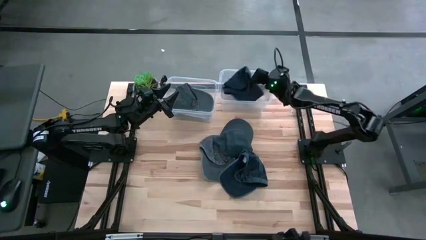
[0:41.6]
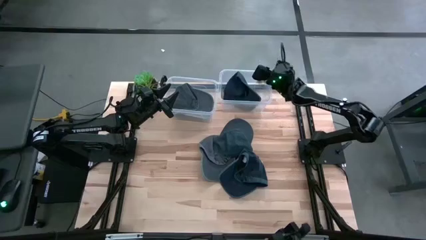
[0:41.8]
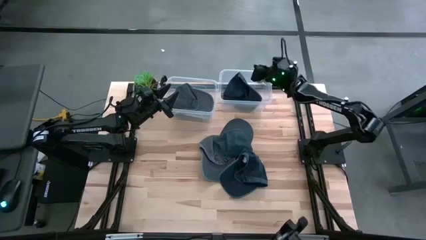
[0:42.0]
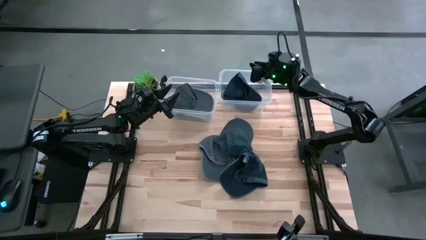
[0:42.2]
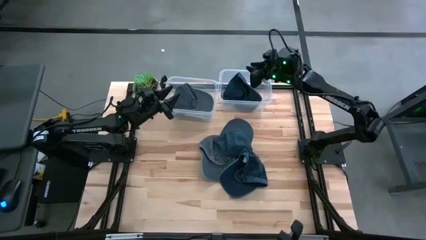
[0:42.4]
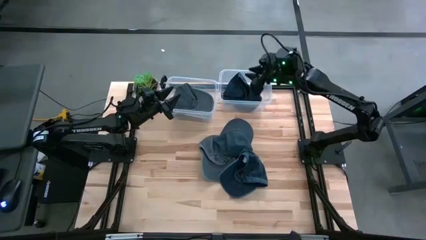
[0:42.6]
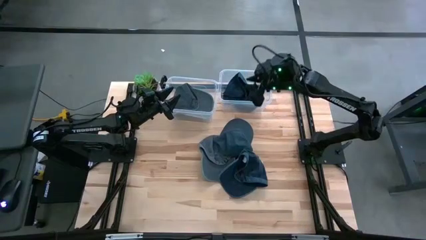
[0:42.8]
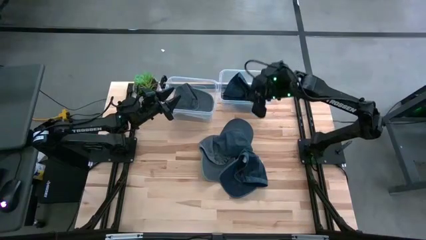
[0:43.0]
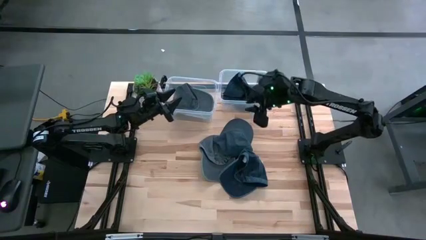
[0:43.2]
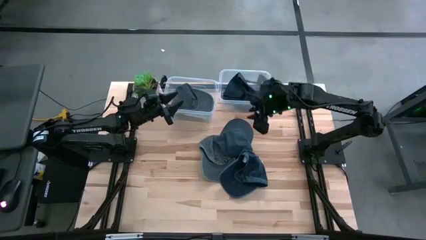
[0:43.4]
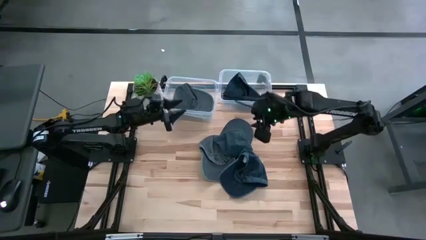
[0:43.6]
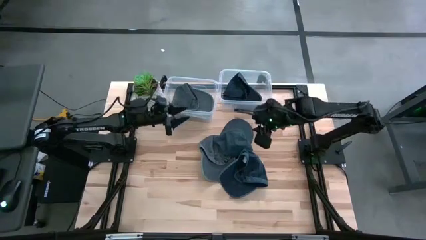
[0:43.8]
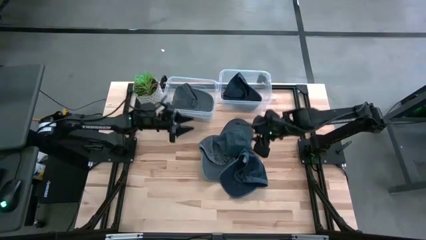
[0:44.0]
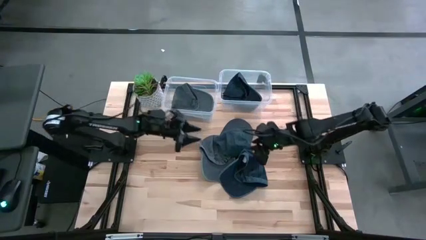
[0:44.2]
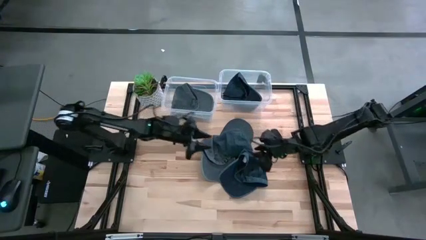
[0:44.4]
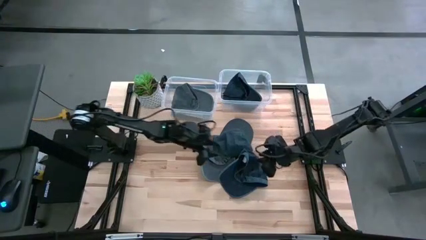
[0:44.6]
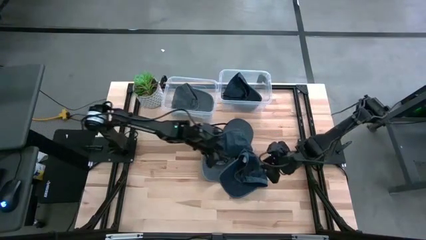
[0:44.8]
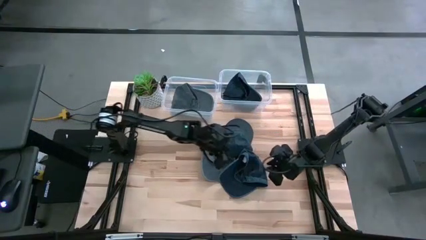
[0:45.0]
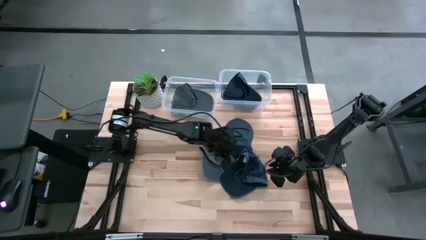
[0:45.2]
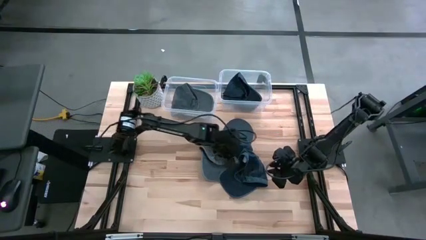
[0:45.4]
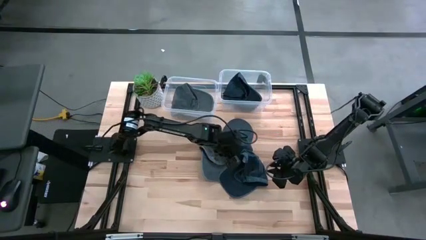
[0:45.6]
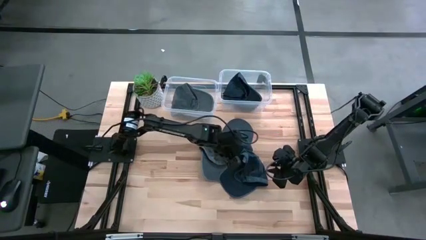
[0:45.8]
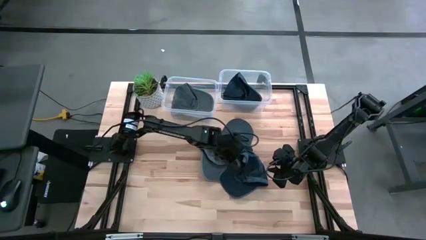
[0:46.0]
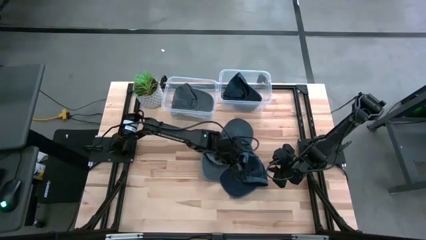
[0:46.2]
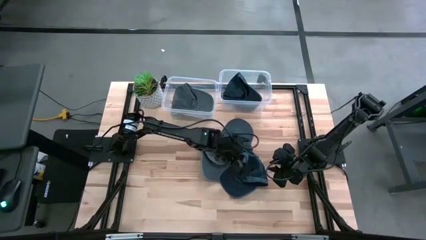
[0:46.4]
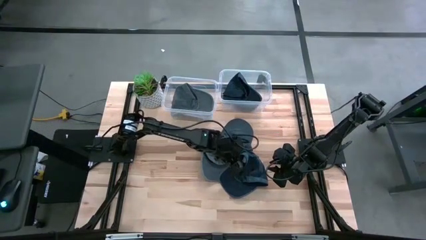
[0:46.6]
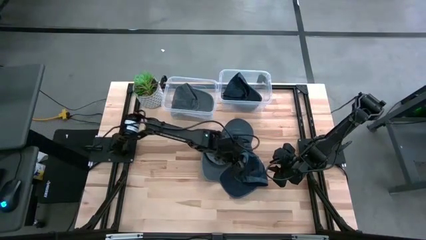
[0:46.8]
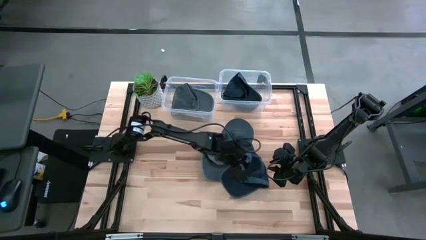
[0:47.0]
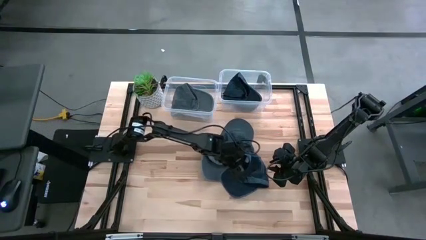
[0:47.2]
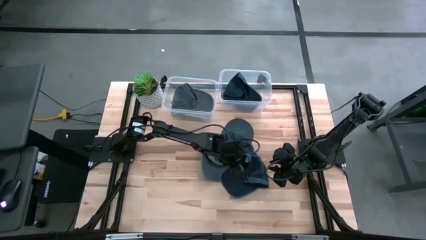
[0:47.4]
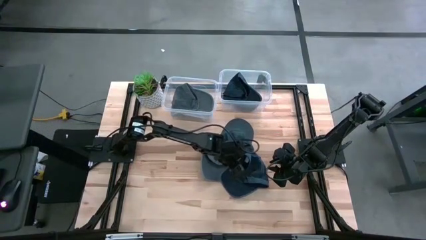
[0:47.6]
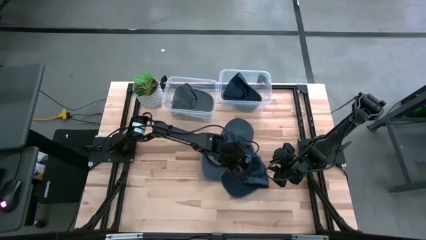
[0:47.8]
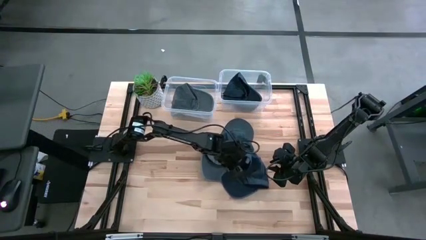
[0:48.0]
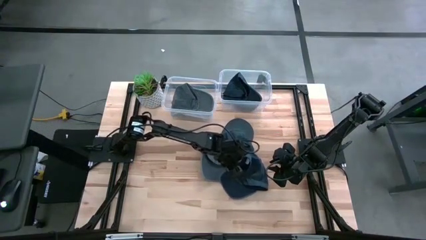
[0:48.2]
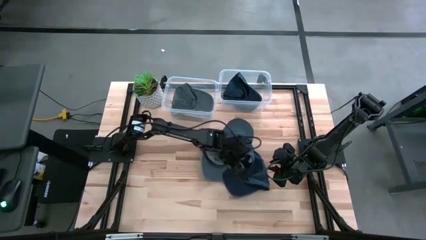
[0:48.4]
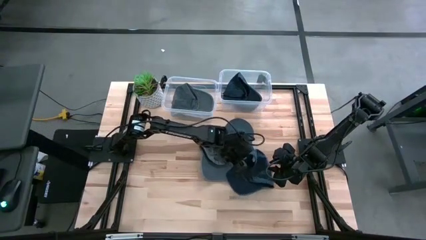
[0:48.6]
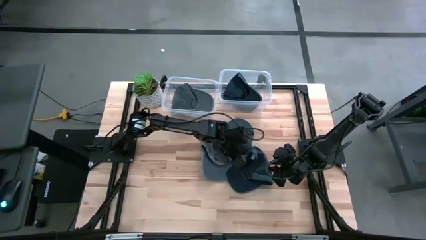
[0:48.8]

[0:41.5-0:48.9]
Task: Pick & Place hat
Put the bottom blue cap into the right transparent bin

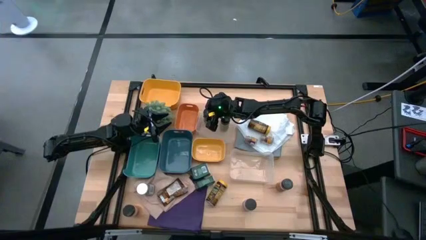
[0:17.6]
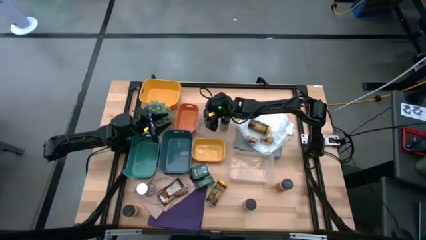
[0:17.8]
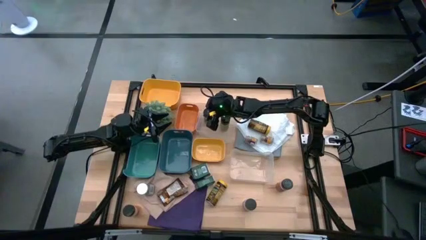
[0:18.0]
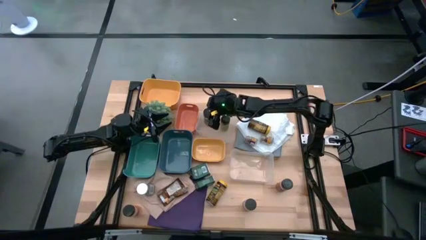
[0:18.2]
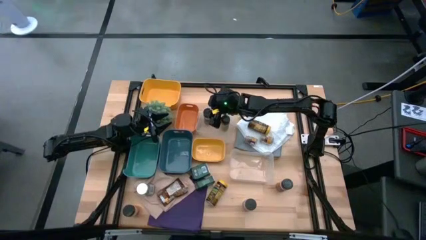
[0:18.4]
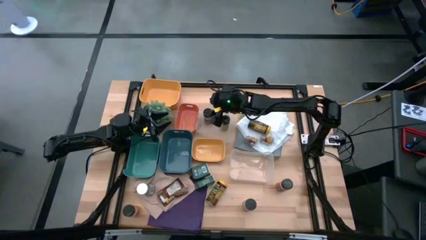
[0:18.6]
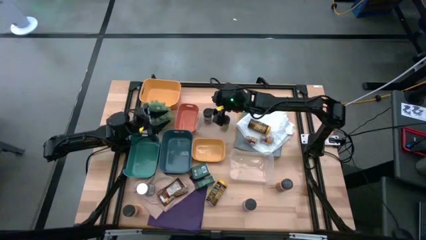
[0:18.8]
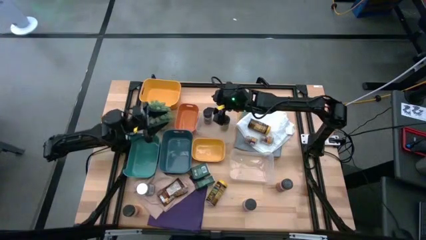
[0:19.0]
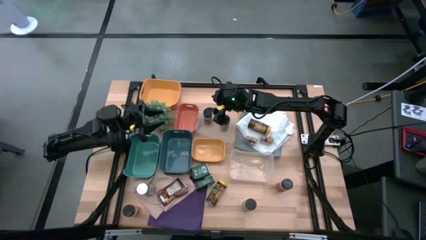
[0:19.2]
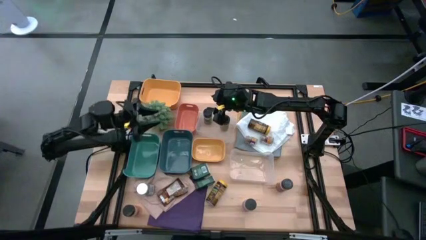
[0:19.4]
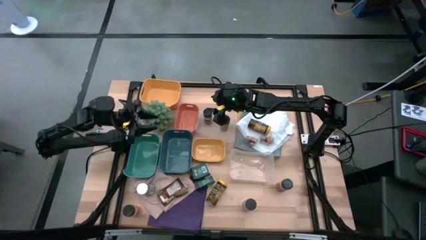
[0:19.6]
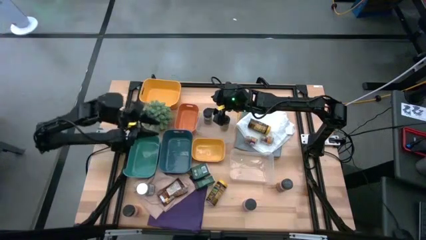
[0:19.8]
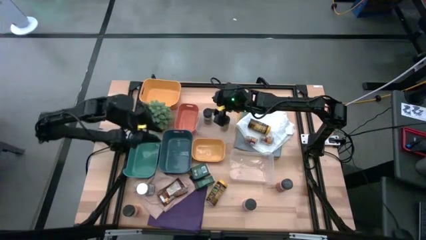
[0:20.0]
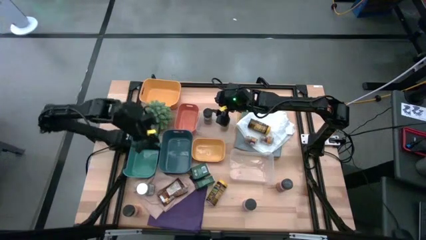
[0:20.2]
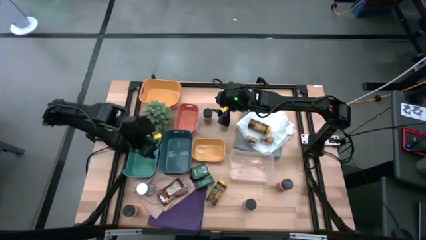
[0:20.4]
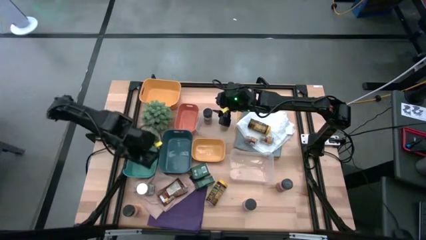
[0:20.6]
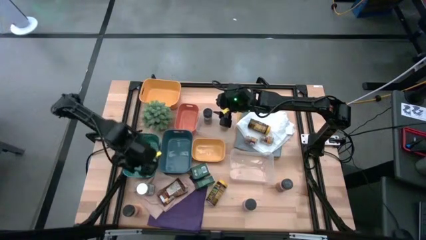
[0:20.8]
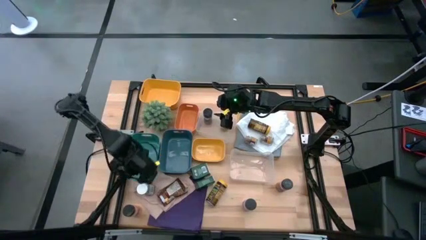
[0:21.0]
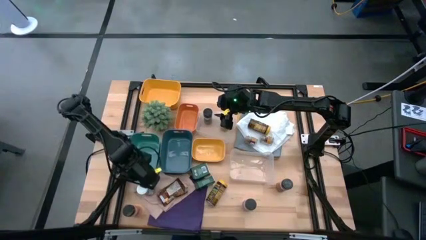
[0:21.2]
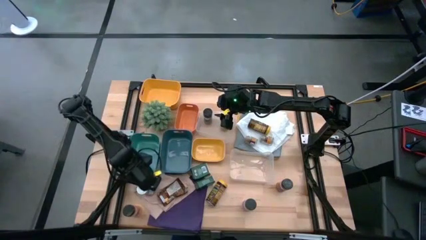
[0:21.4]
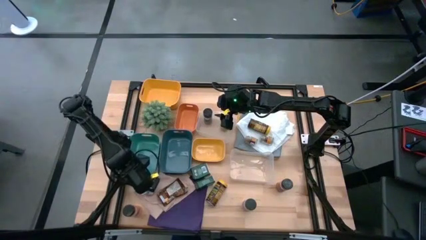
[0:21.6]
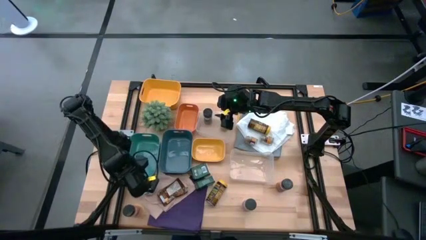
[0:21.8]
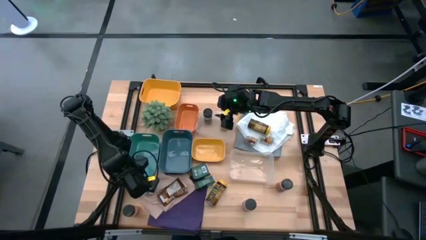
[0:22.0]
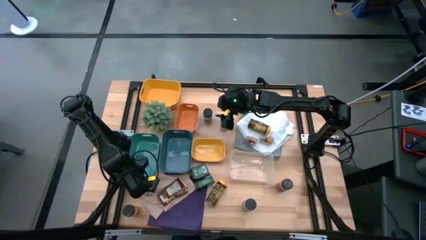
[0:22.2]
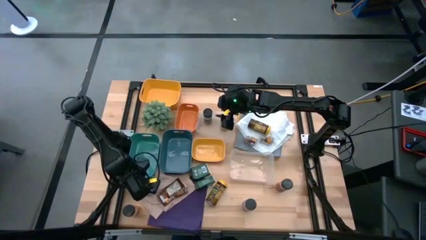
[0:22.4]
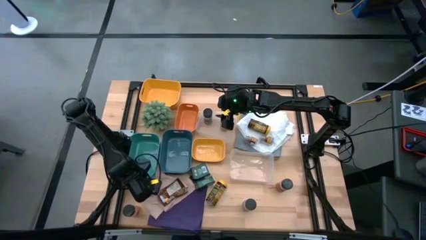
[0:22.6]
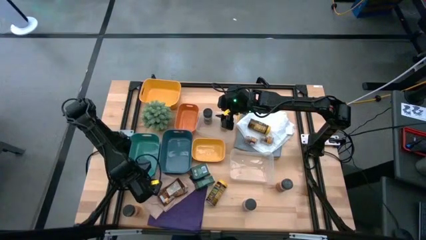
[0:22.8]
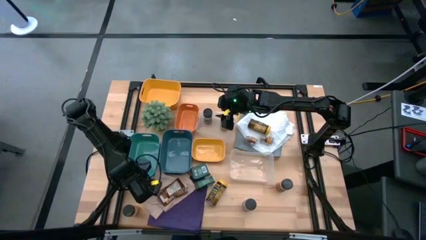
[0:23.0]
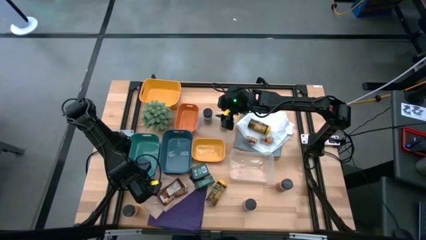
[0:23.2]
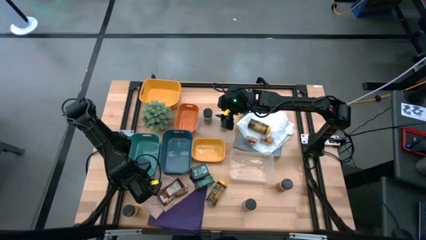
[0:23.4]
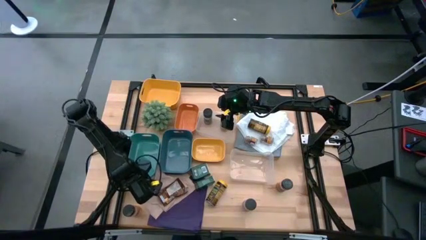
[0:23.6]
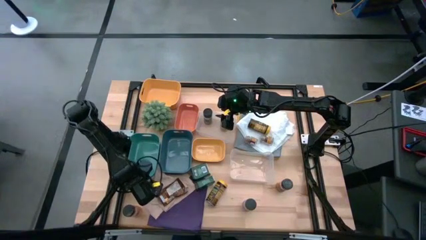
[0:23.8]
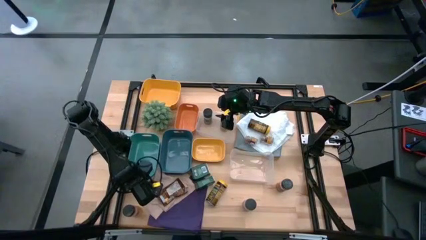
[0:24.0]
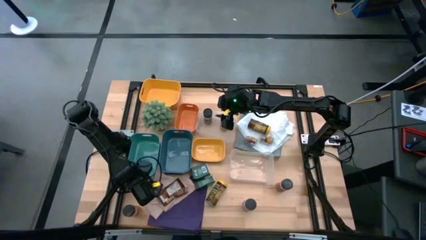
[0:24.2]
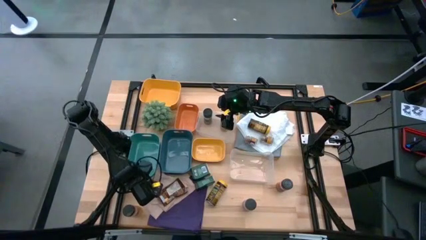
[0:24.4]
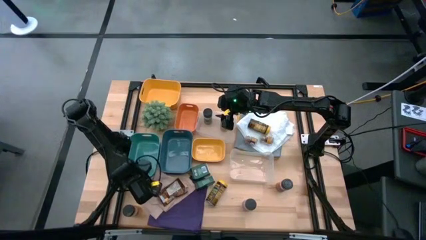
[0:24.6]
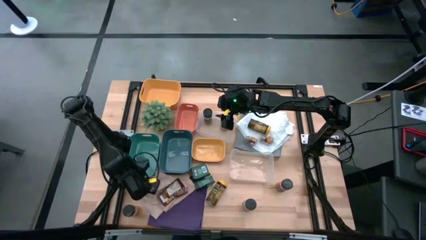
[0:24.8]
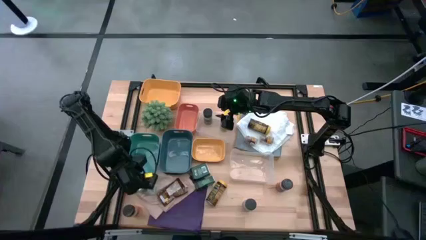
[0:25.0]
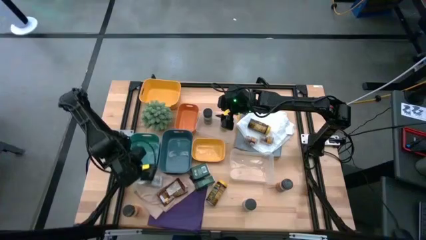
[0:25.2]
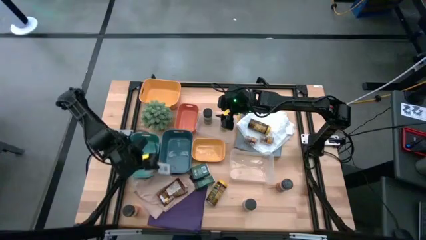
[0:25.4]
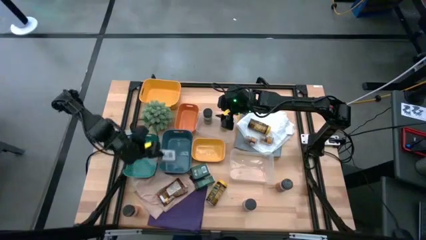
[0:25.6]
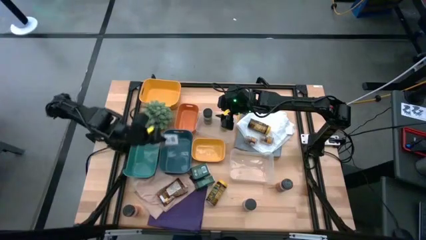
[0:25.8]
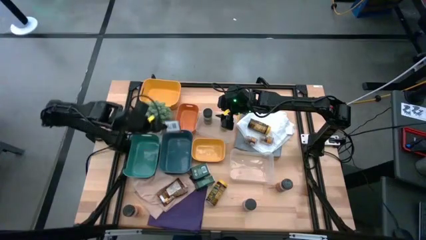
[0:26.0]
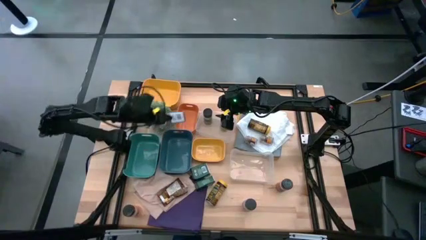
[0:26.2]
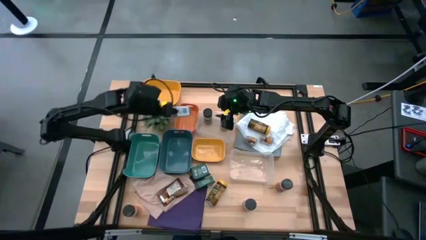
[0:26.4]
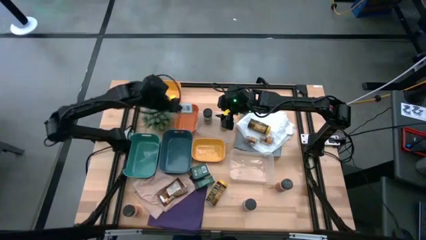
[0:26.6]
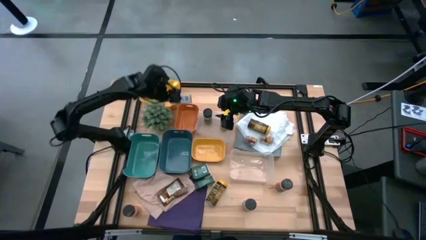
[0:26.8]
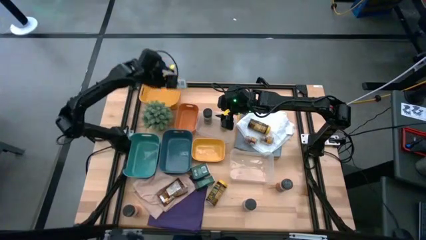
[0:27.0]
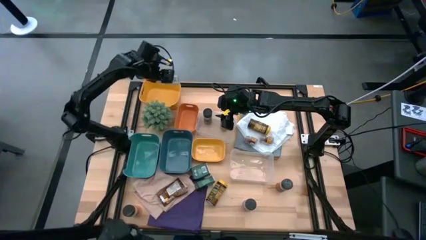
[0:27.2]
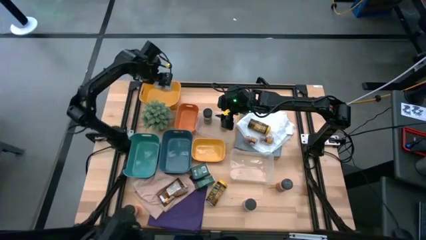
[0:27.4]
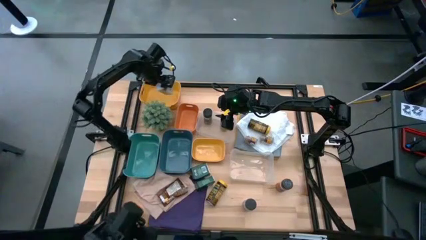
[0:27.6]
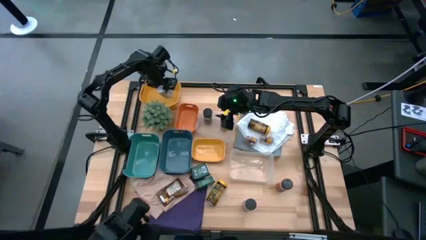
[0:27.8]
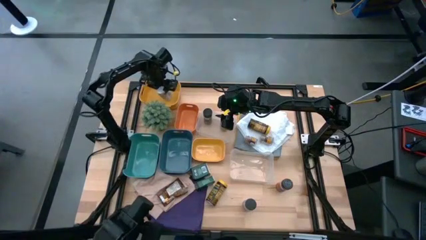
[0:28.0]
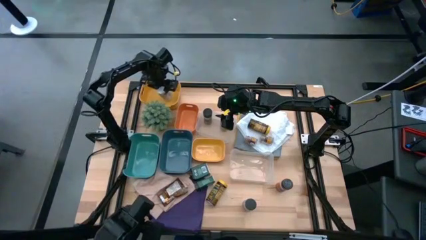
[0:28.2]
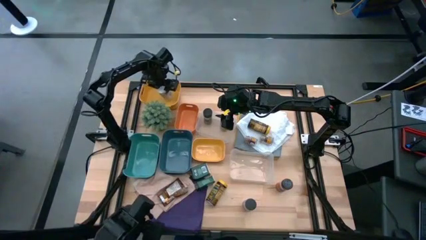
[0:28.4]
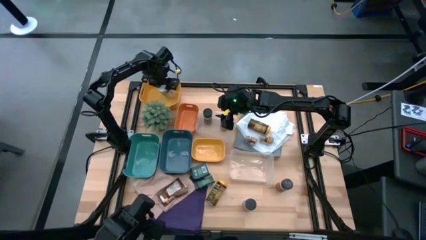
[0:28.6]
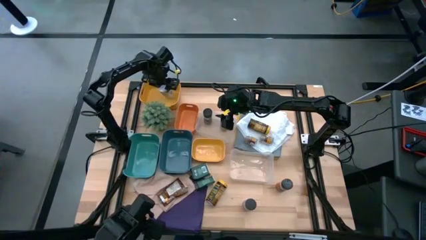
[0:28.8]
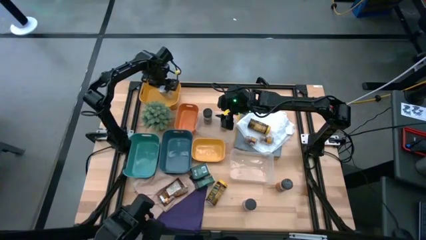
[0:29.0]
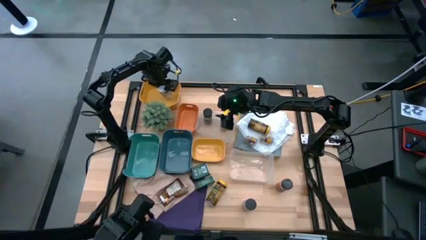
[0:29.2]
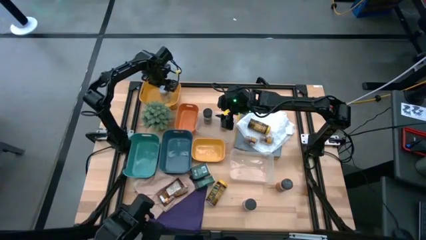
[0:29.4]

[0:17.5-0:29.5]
Task: Sort spices by type
Put the white seasoning bottle into the top yellow bin
